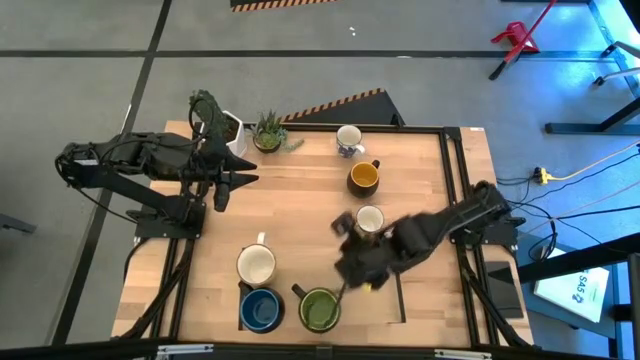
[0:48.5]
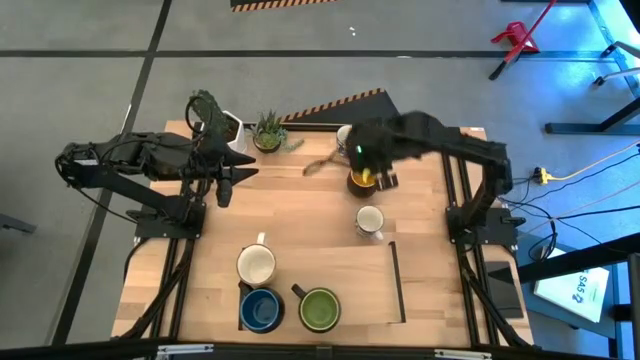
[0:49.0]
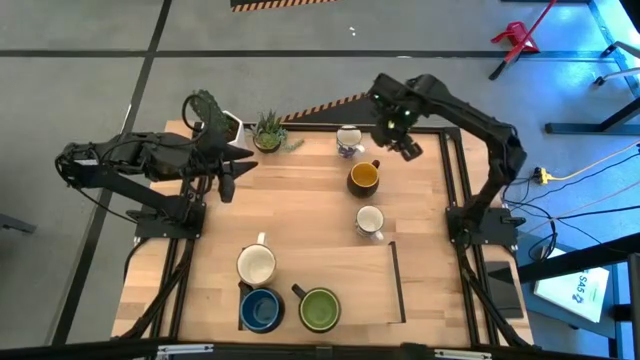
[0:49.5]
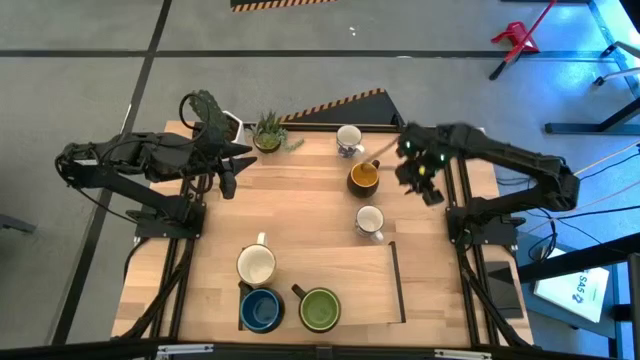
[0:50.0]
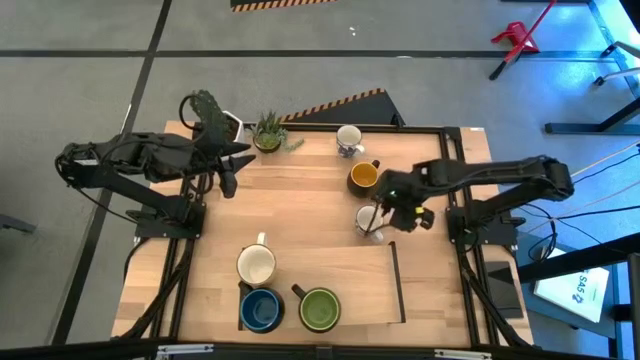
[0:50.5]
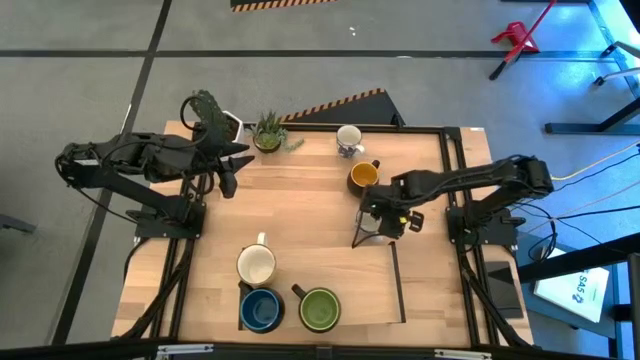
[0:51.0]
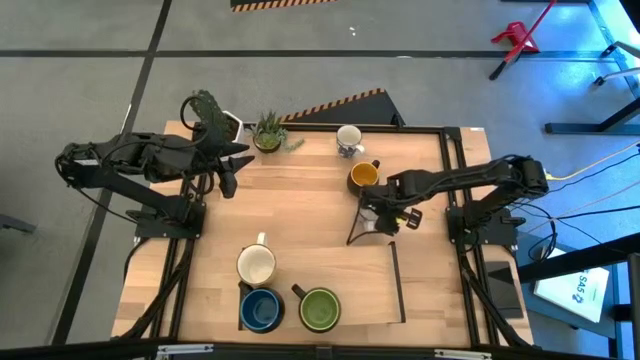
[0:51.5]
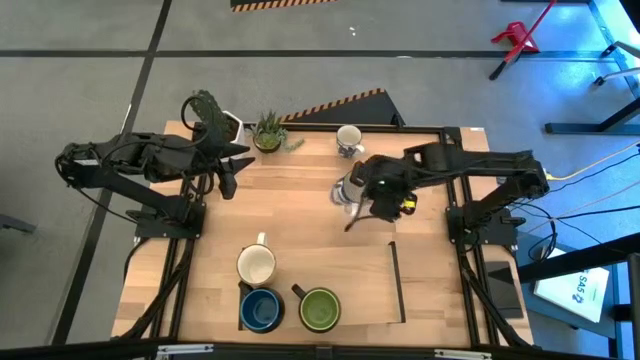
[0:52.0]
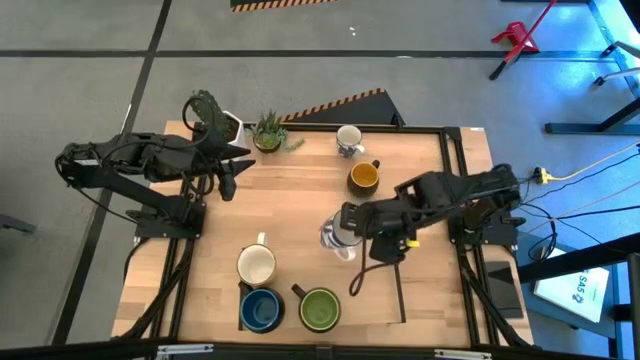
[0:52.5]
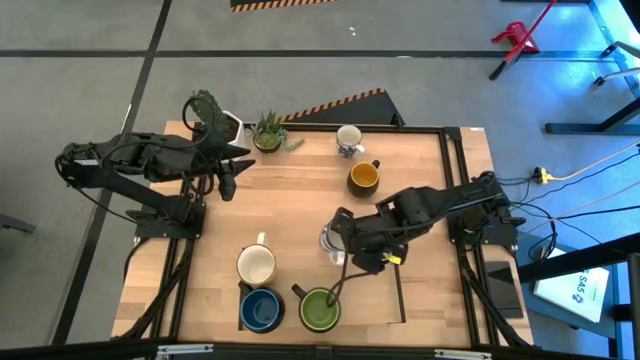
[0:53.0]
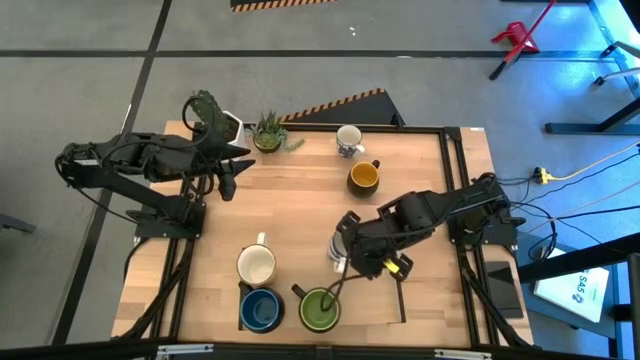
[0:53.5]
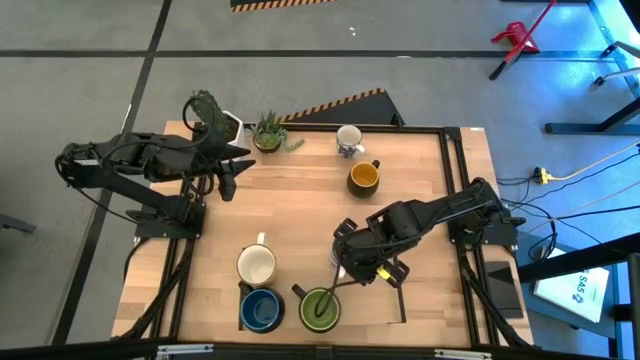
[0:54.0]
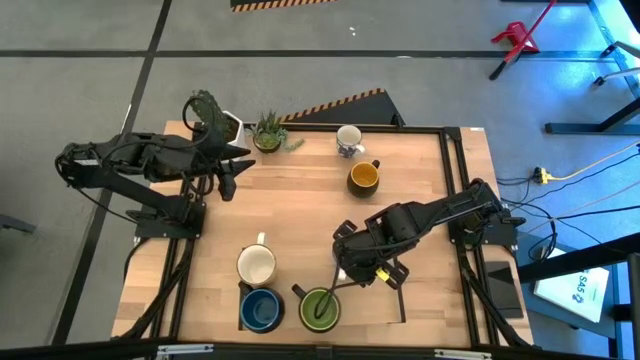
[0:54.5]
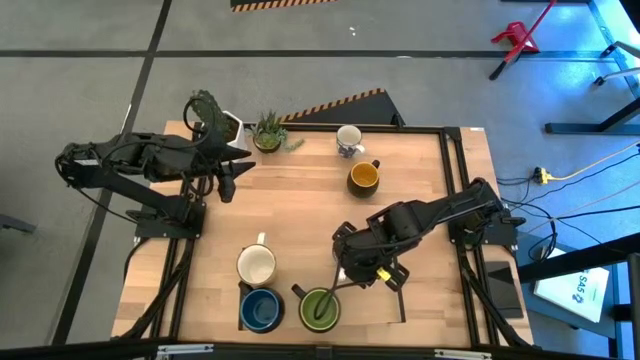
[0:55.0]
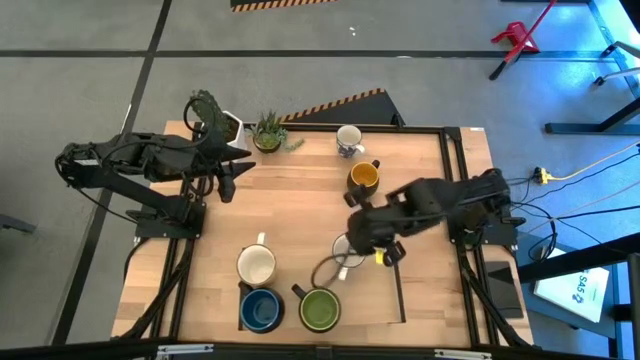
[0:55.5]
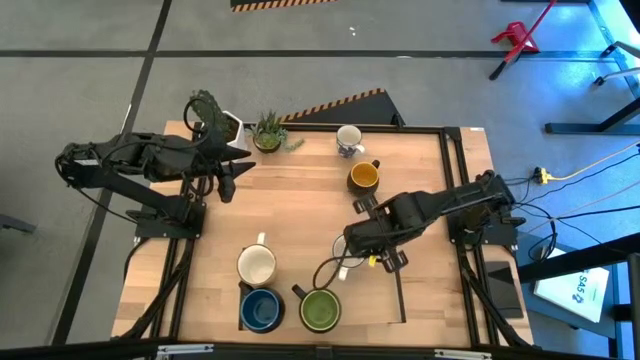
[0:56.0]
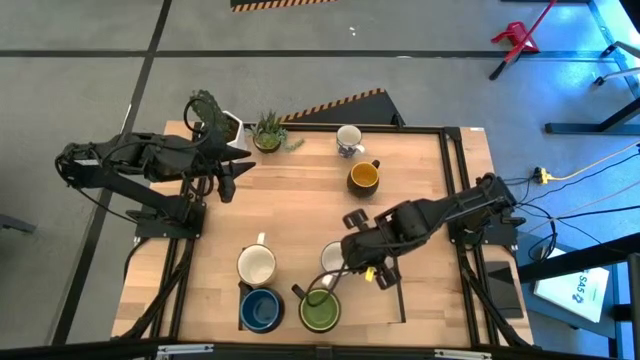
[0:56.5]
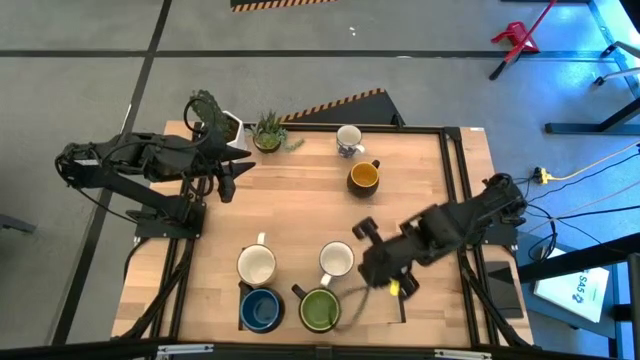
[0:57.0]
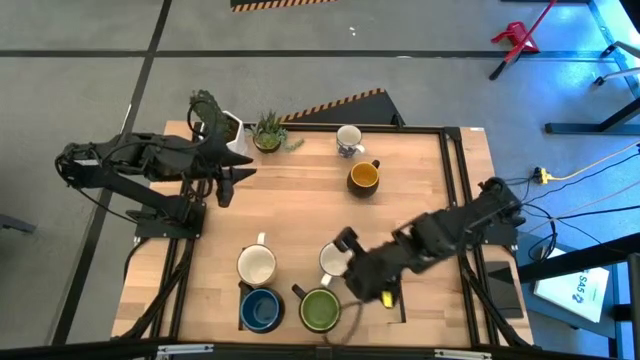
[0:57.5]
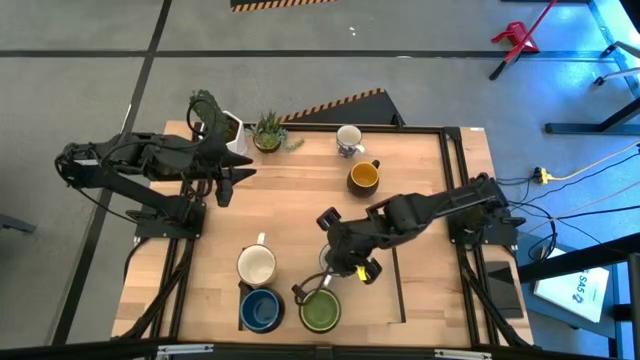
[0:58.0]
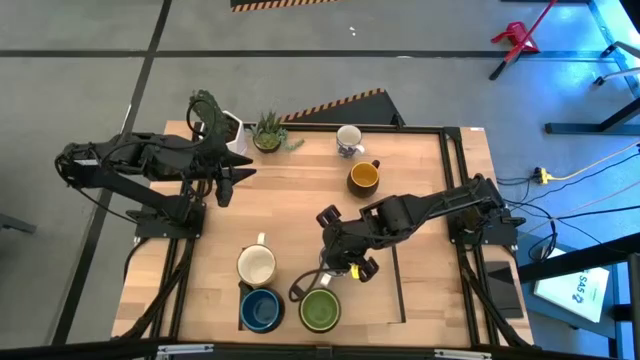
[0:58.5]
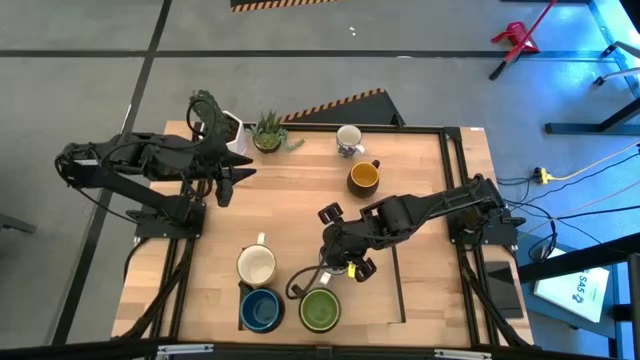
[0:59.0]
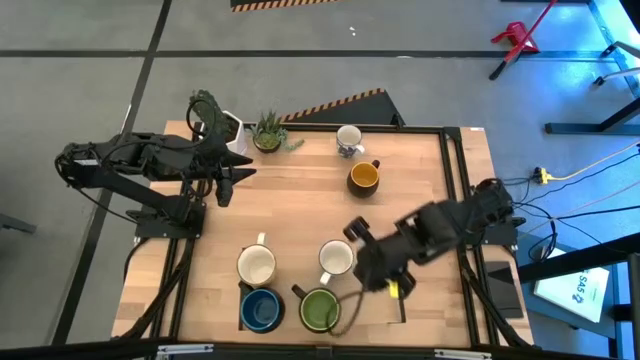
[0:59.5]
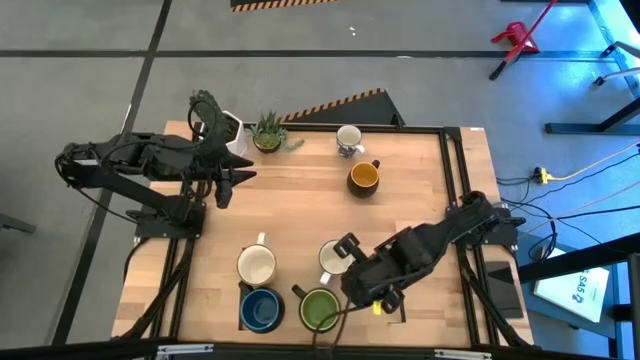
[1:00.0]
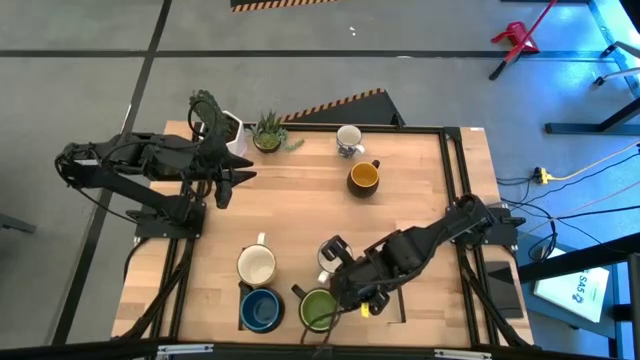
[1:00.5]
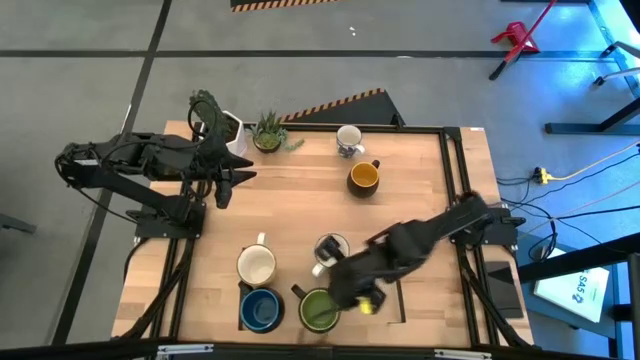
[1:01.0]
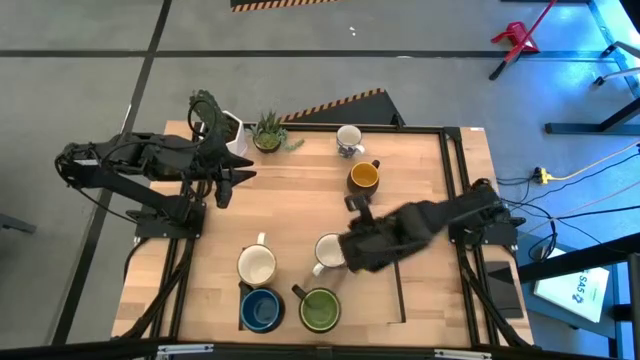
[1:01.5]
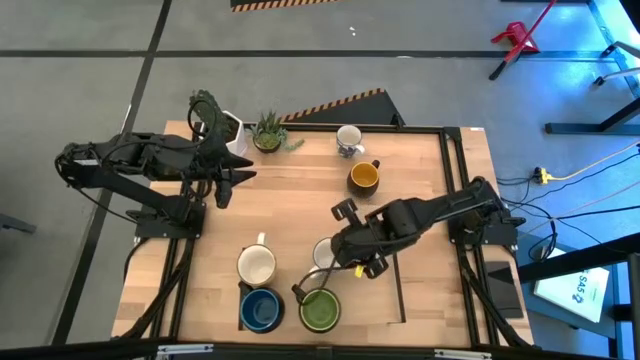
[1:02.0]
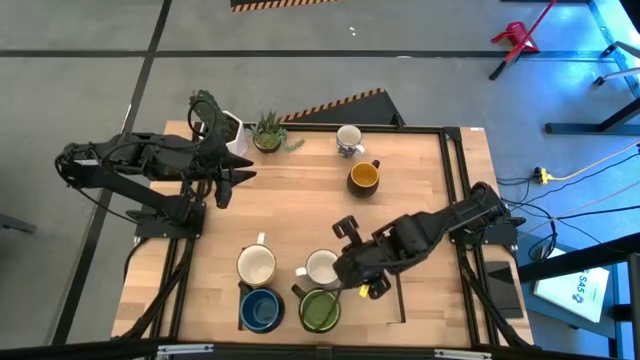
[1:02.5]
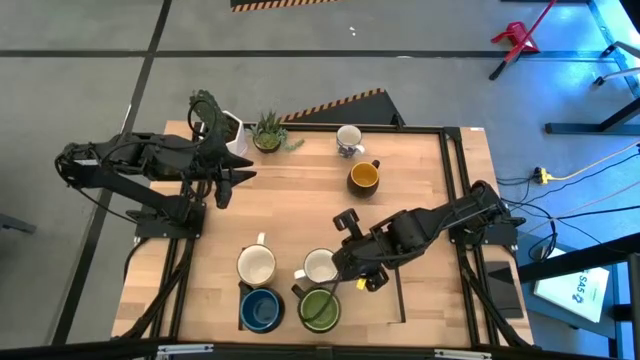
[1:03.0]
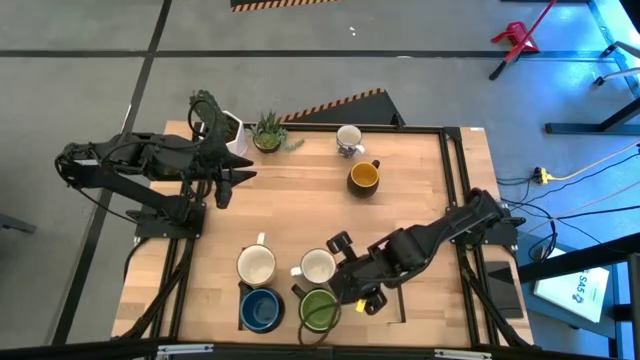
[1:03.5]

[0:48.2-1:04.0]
Task: Place coffee mugs
Put the bottom patterned blue mug on the shelf

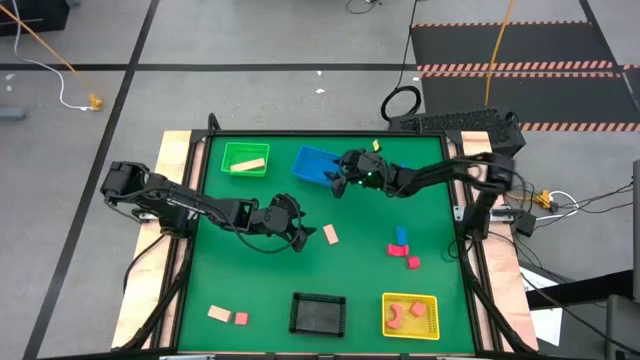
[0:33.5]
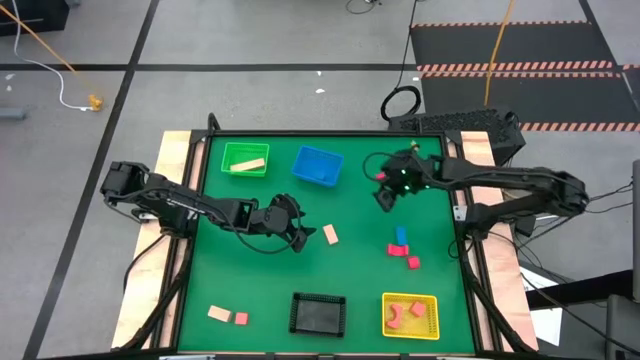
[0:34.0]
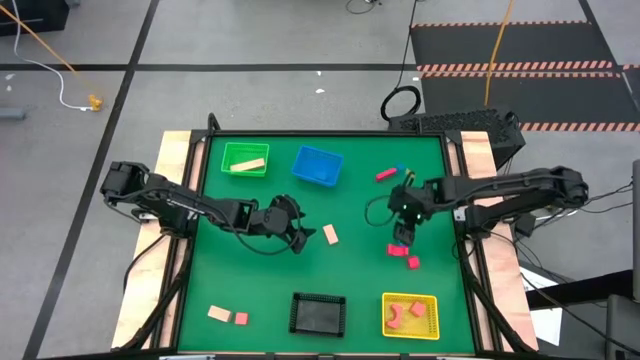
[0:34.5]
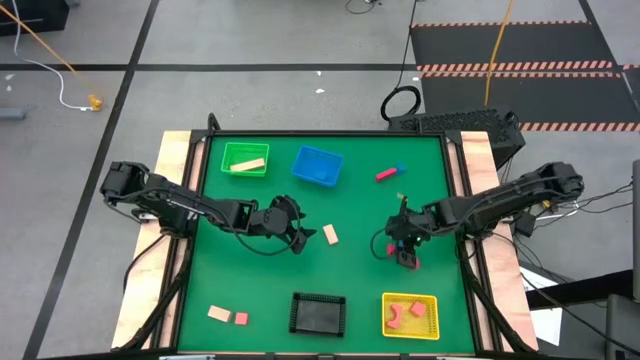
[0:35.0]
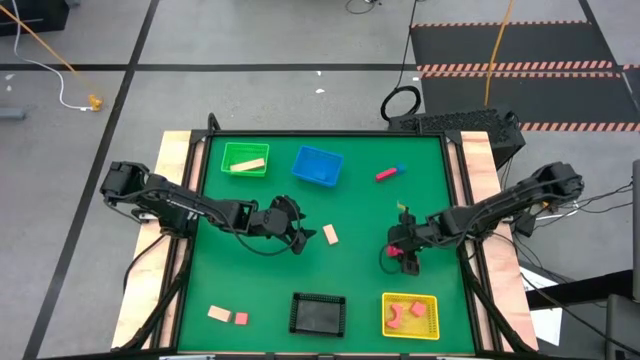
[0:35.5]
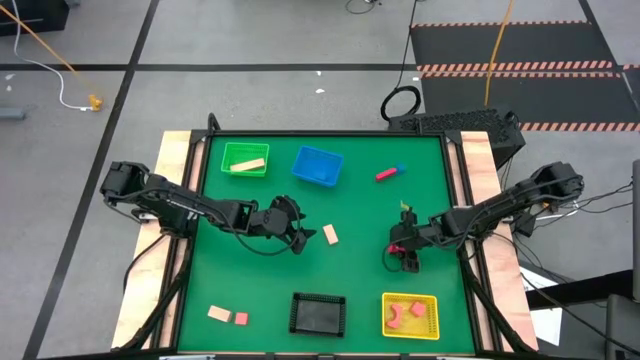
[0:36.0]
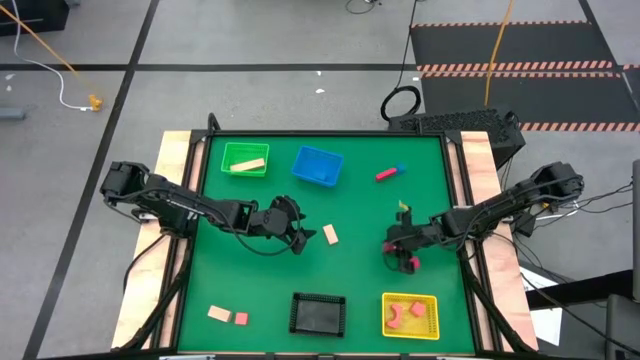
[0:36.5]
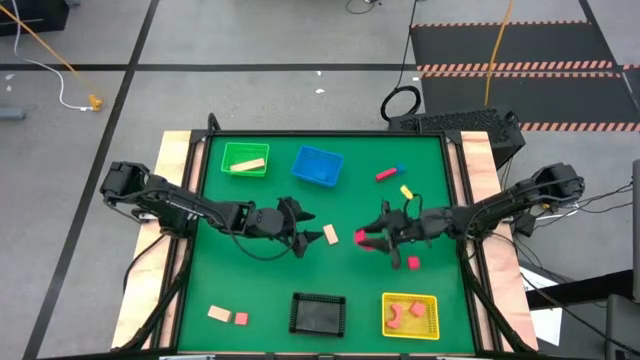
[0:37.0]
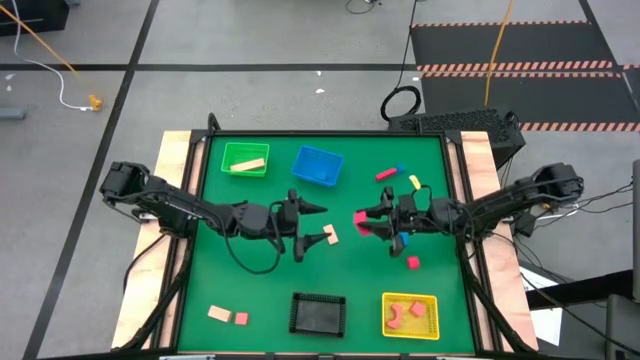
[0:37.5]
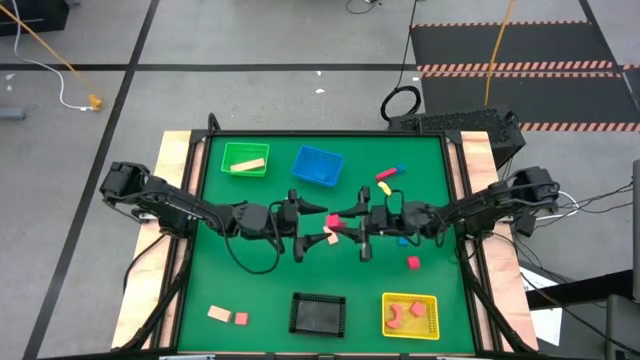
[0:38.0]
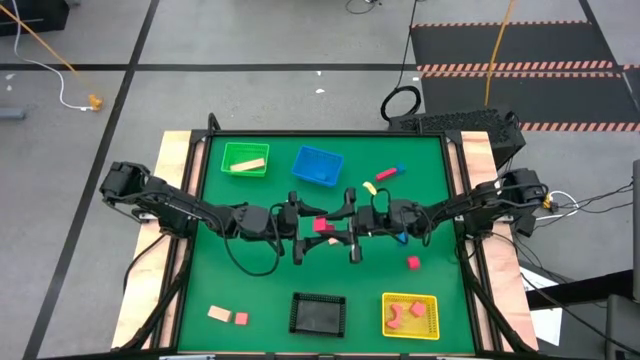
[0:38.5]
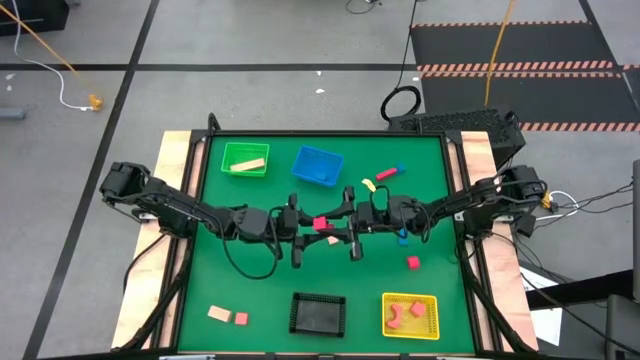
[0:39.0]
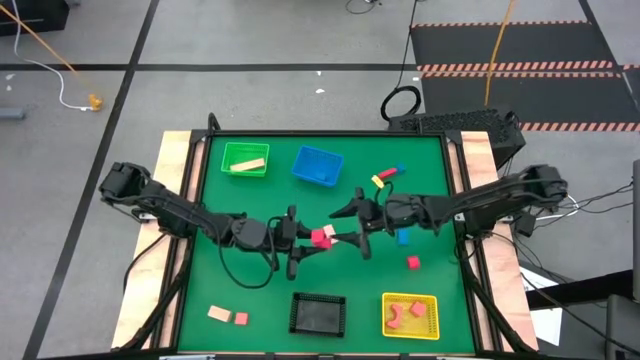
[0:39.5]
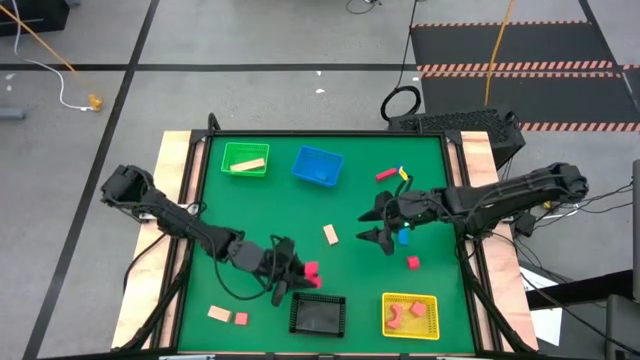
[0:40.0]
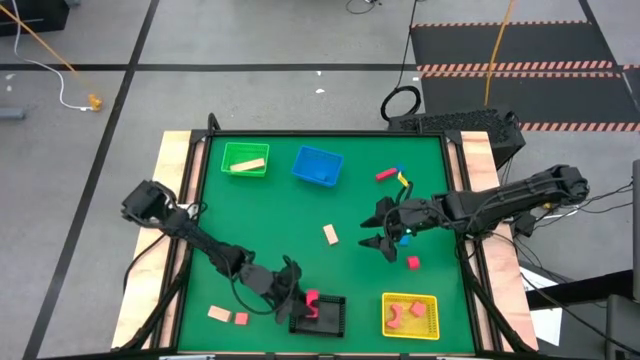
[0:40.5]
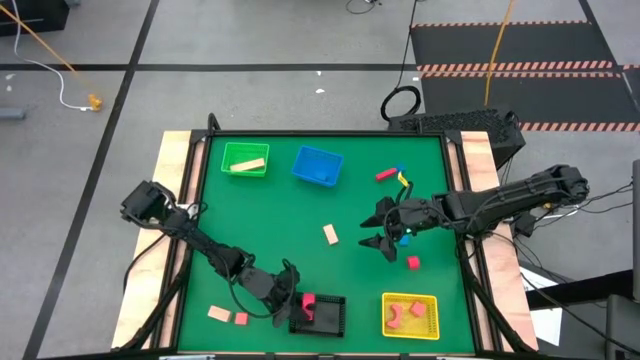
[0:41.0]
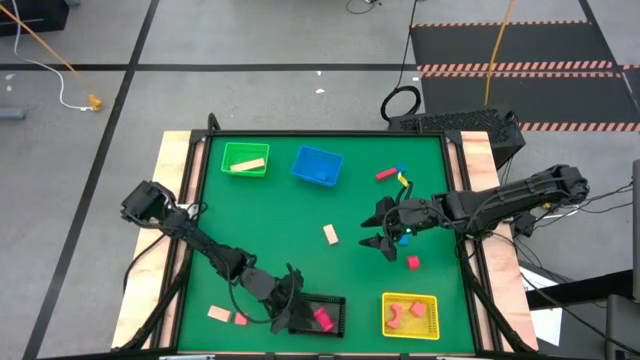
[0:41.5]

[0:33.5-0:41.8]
Task: Sort & place blocks by color
Put the middle red wooden block into the black basket
